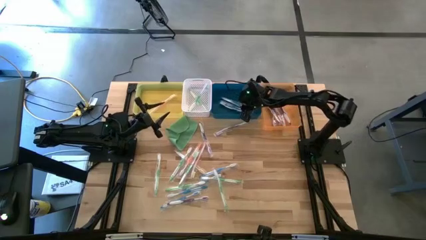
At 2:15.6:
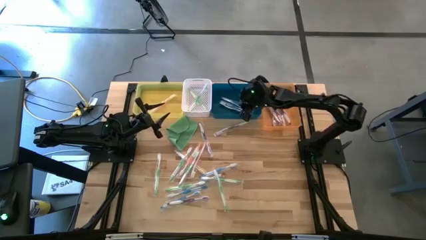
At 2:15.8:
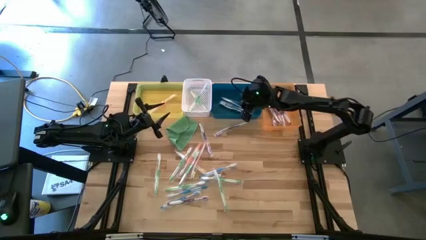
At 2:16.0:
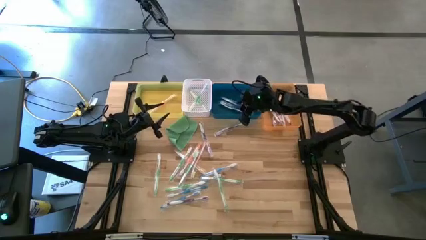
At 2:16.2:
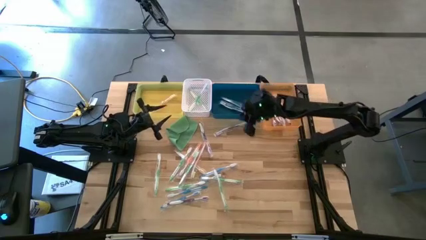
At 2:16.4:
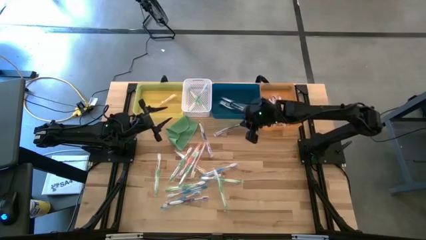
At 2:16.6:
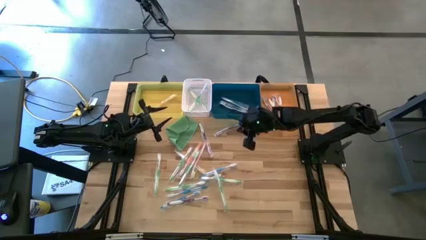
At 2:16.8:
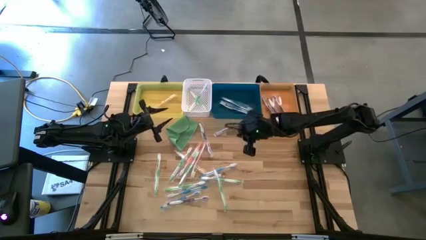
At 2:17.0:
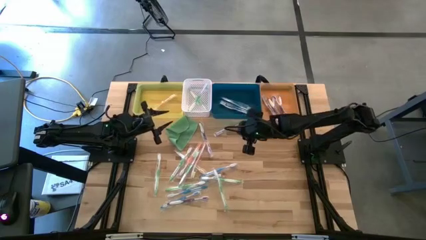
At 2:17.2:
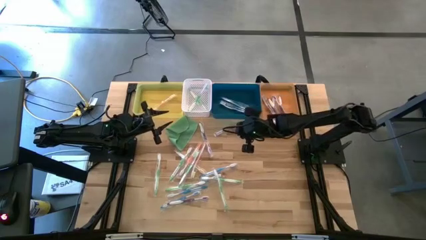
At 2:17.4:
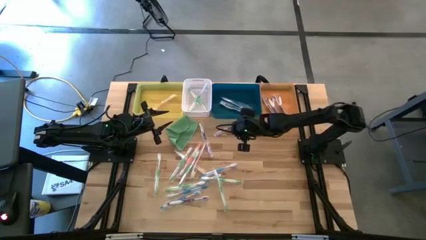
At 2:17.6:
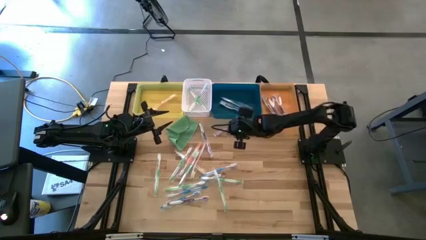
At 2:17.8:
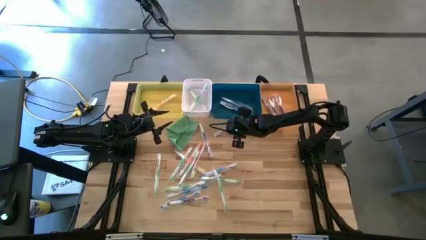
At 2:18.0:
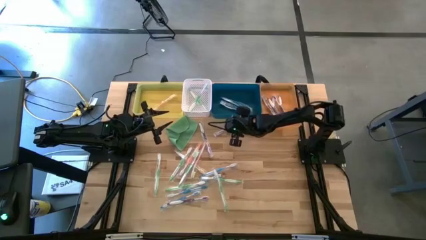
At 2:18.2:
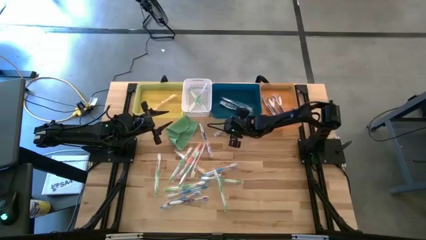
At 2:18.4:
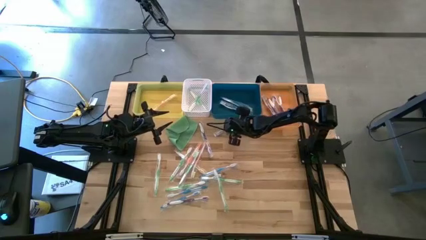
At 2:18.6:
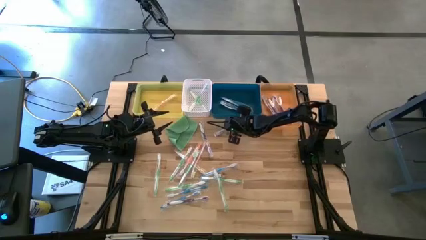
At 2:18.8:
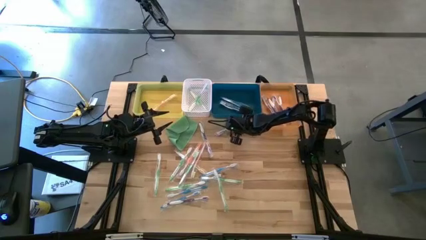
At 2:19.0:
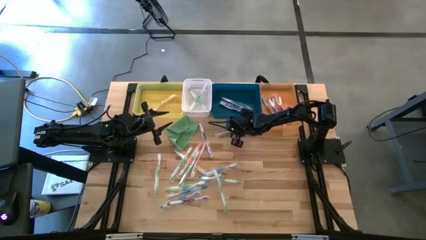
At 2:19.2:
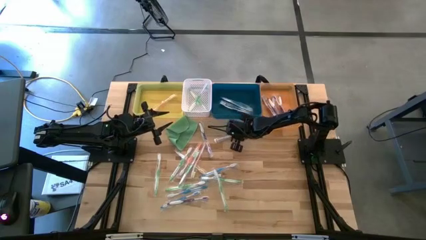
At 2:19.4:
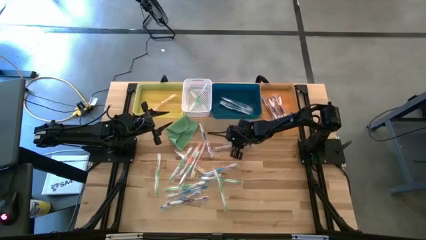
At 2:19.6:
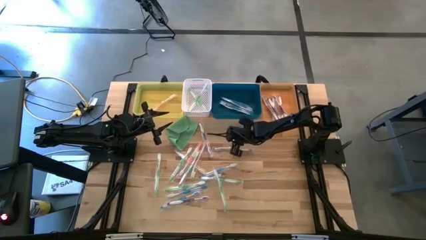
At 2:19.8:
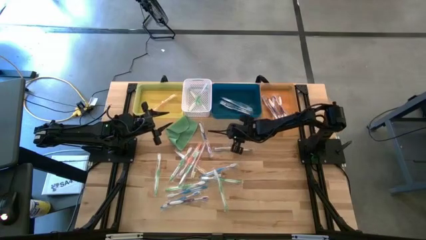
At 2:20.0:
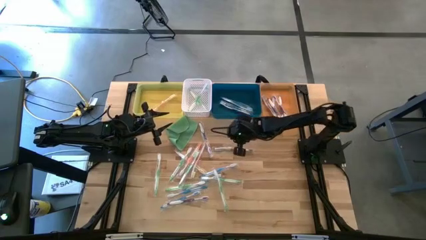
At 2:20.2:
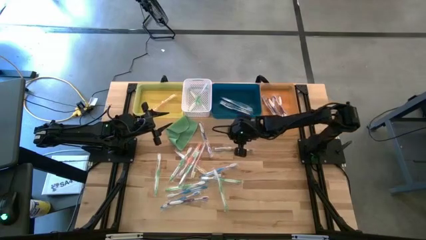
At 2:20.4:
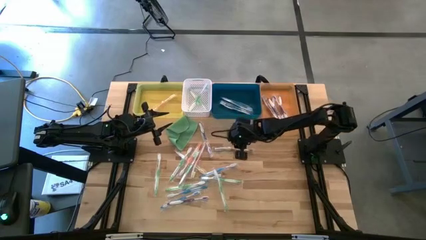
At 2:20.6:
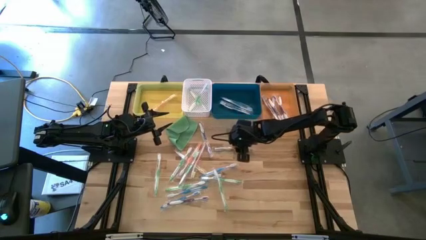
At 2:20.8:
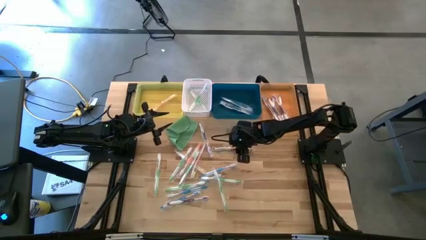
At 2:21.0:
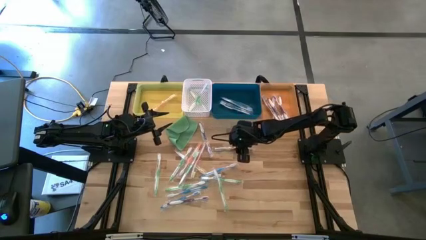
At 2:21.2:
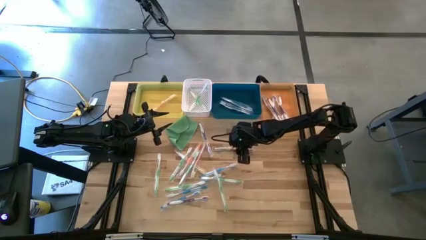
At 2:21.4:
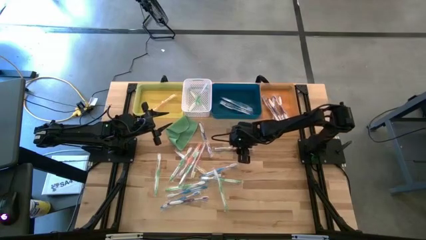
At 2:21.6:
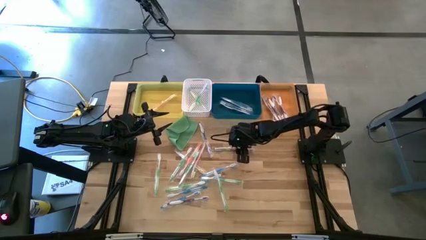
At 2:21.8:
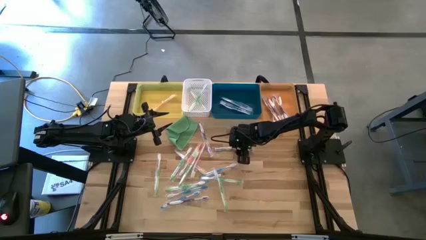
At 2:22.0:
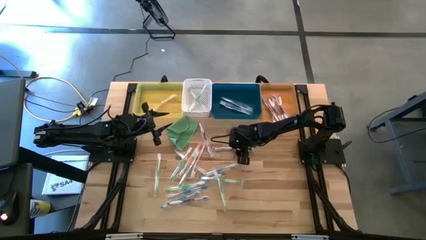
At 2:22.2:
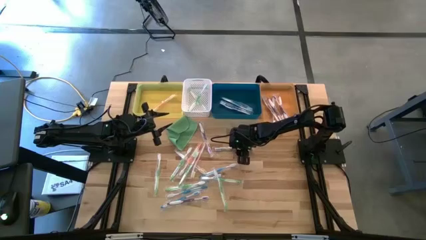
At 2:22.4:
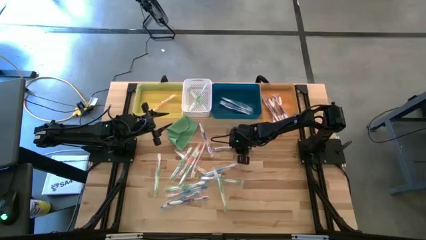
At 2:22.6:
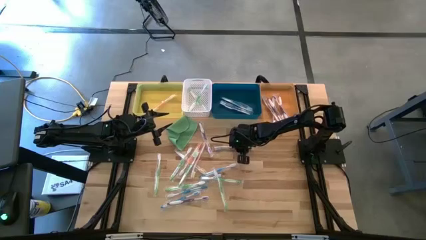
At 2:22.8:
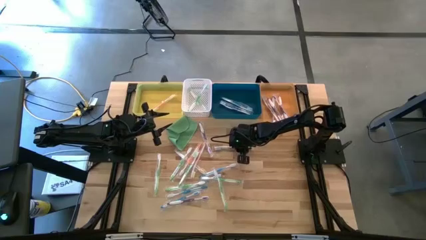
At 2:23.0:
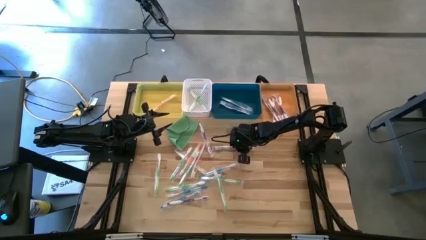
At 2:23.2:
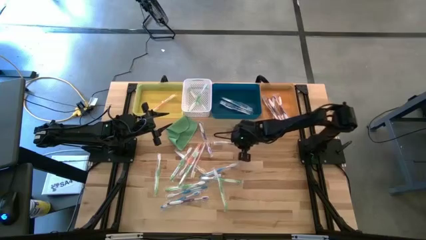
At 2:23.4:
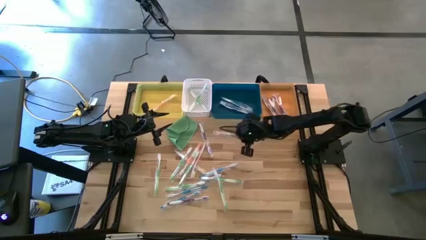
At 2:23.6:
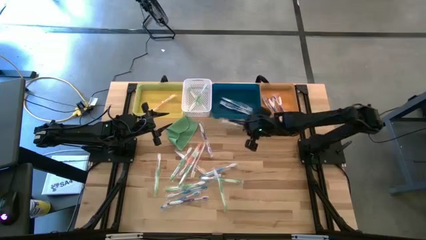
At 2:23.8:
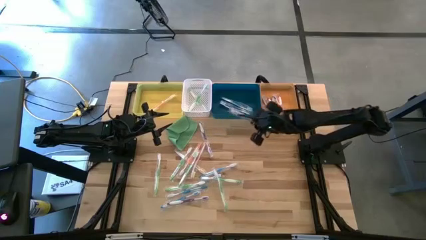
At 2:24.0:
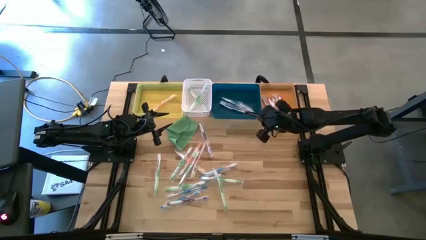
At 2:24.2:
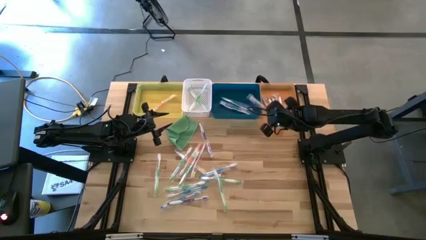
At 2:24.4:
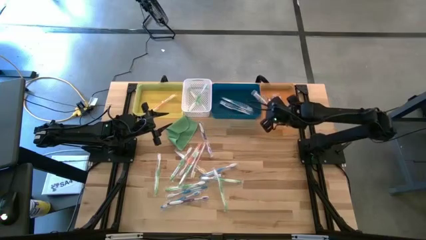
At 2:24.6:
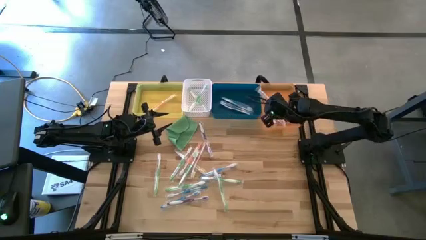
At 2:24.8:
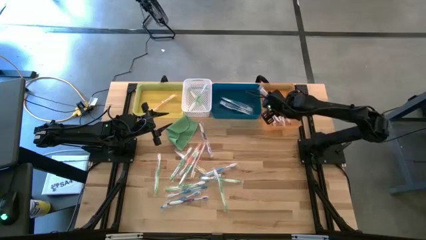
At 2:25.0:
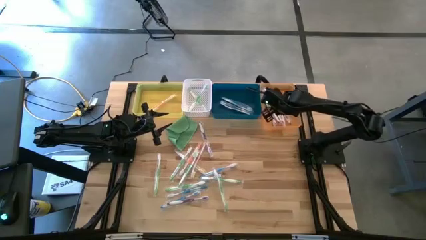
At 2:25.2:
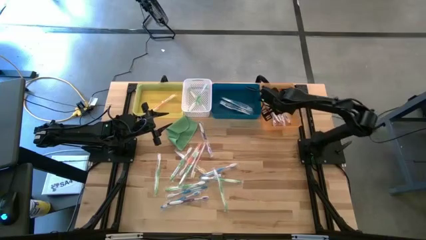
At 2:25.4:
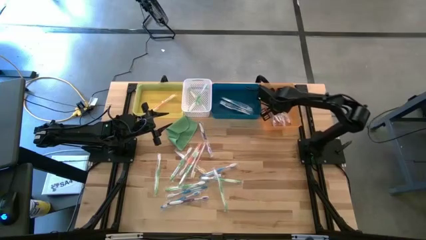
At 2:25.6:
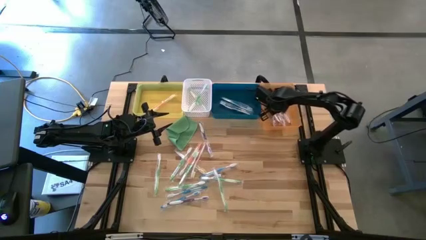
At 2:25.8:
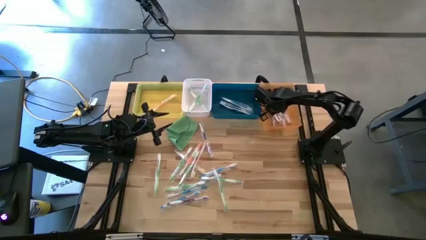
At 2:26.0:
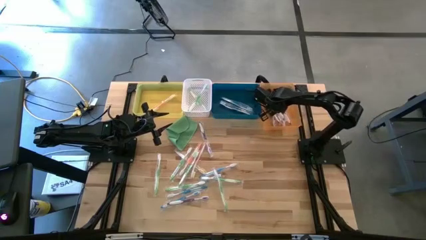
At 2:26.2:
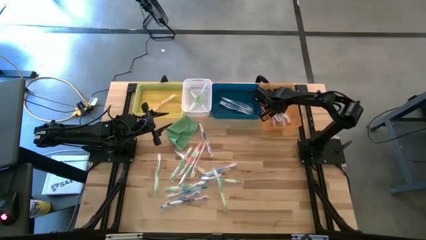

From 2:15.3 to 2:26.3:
Task: Pick & Place Toothbrushes
Put the violet toothbrush into the orange bin

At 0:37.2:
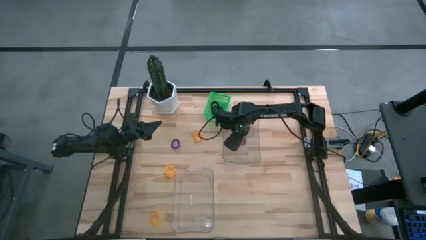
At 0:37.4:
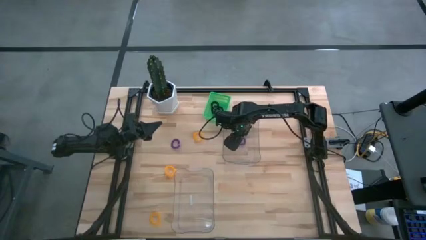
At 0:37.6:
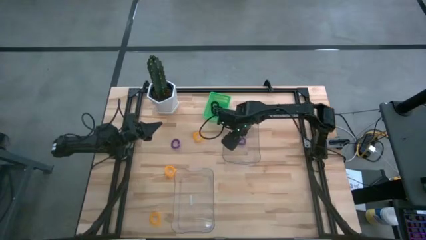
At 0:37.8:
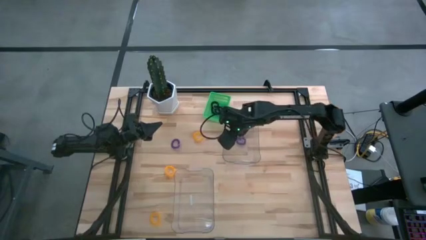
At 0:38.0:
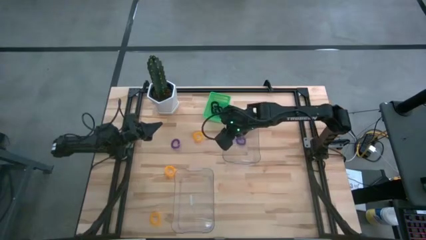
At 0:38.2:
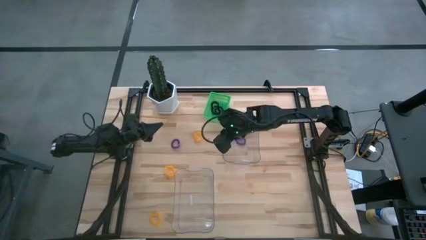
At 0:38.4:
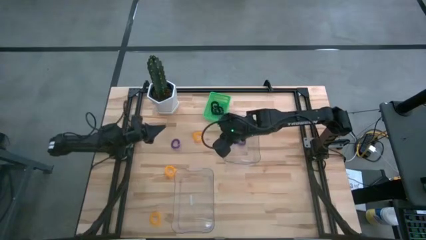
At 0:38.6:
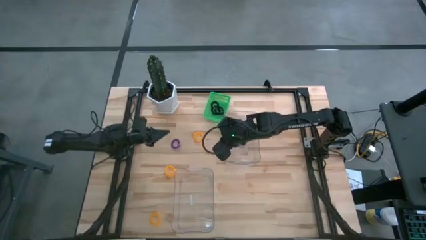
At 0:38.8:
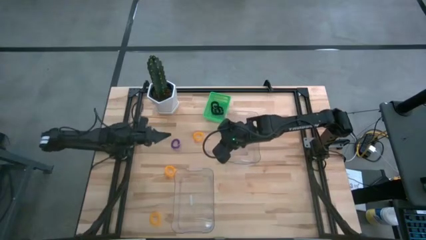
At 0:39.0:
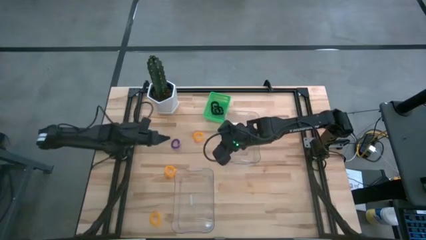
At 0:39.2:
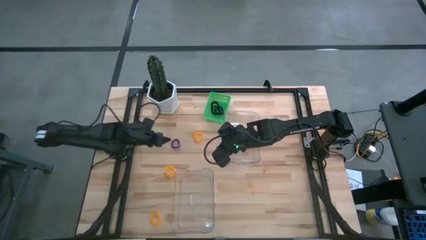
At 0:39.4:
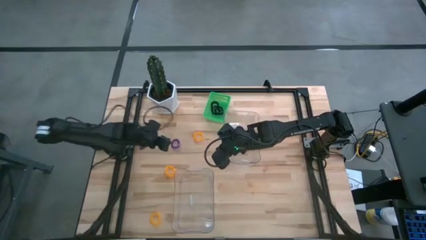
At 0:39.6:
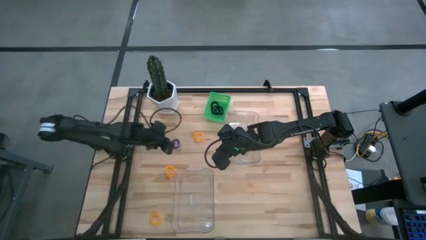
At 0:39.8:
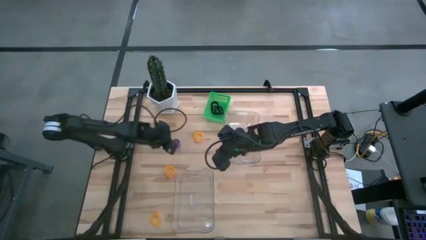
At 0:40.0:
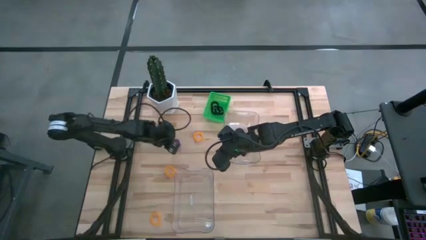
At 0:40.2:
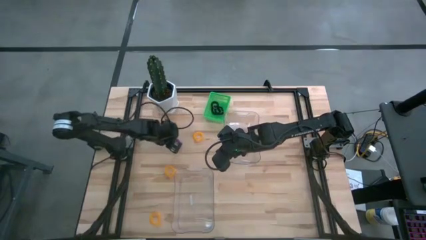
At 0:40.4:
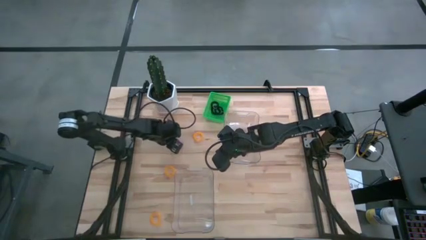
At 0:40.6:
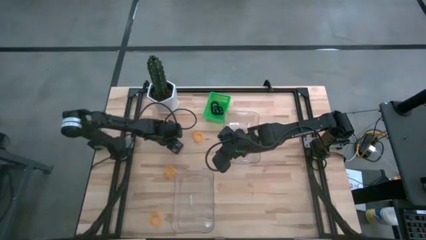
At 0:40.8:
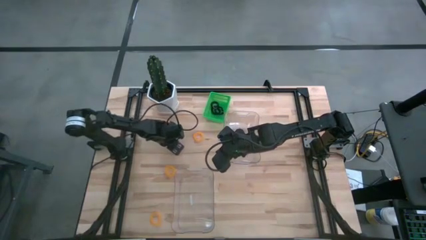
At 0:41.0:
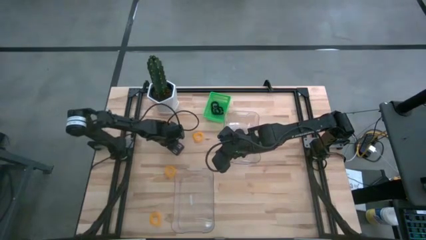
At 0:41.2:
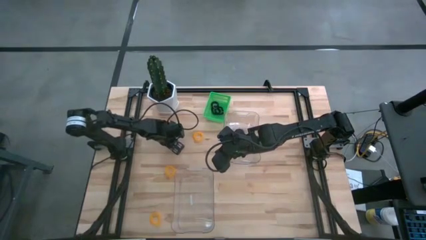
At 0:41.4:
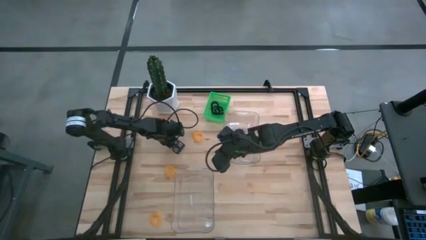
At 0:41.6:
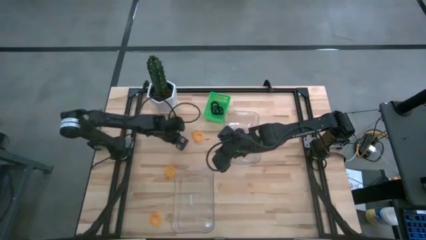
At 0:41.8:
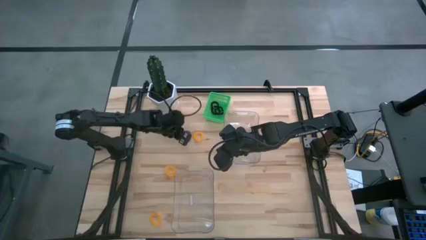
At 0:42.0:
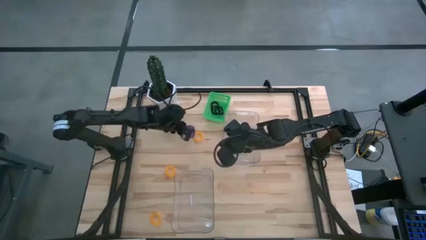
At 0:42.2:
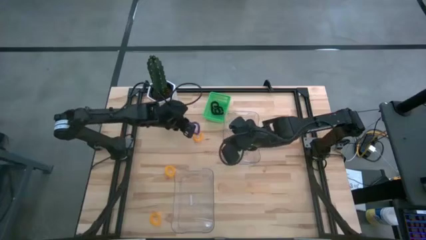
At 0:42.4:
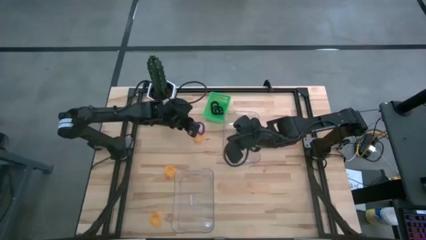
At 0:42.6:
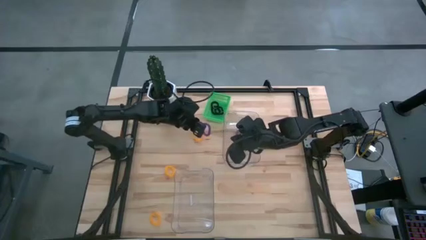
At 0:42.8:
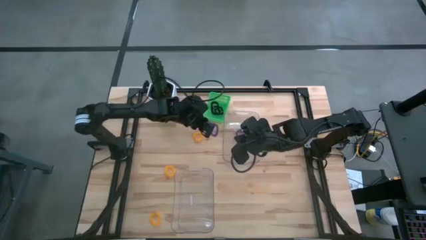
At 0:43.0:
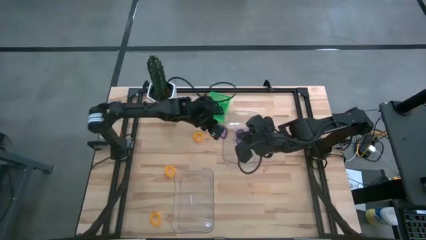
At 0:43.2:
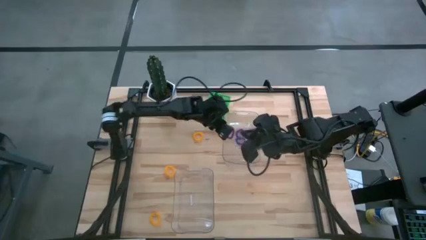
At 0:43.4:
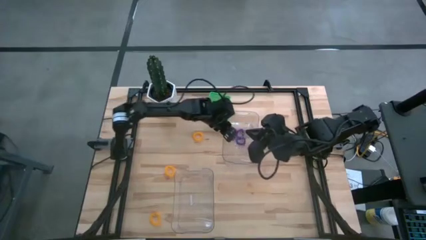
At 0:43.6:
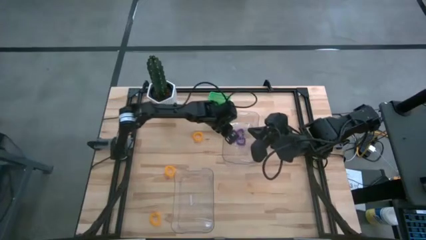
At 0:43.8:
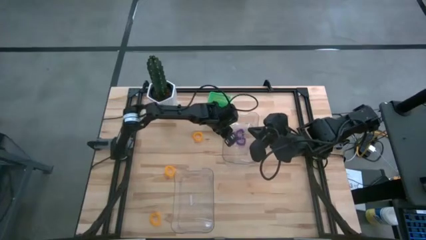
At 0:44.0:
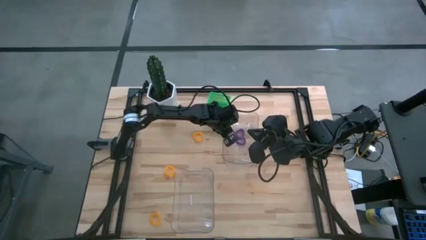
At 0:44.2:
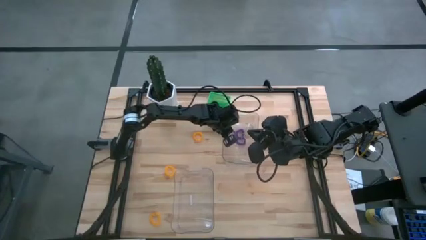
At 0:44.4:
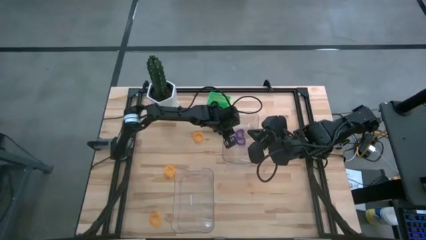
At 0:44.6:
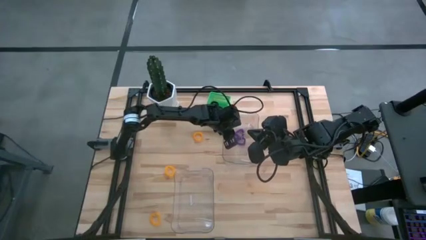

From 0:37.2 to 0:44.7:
Task: Sort spring keychains
Put the violet spring keychain into the top transparent bin
